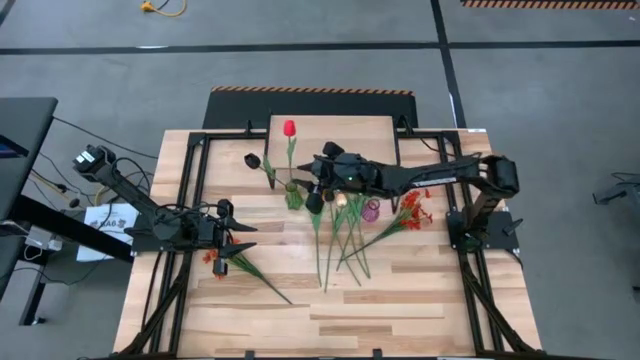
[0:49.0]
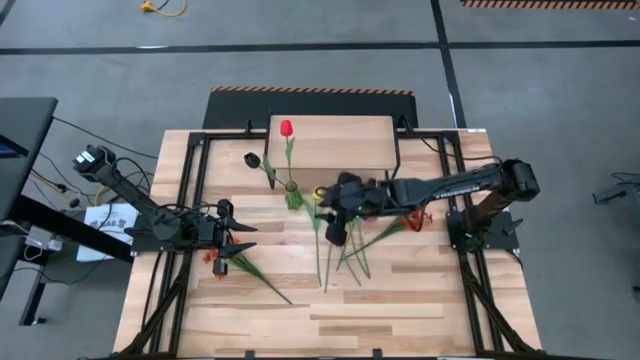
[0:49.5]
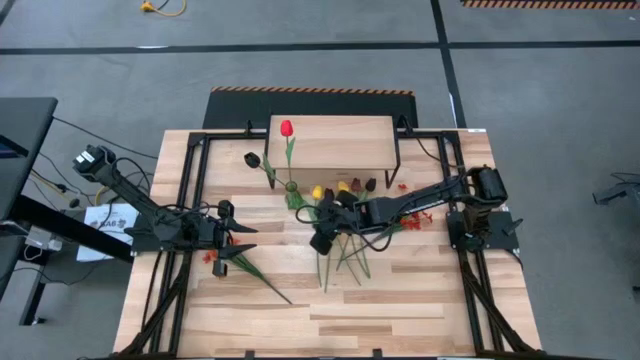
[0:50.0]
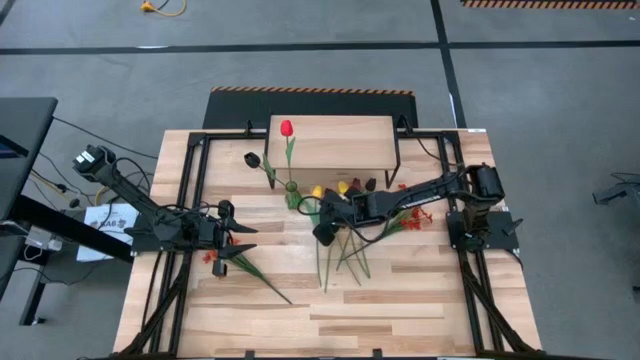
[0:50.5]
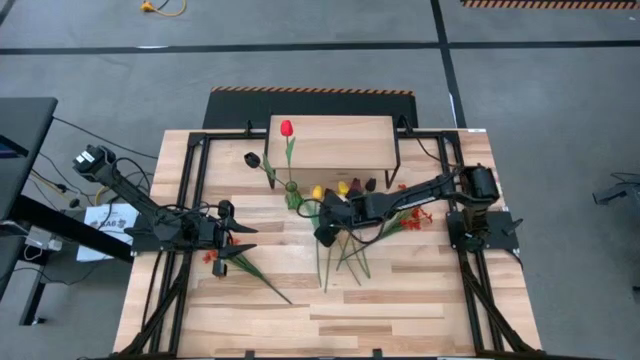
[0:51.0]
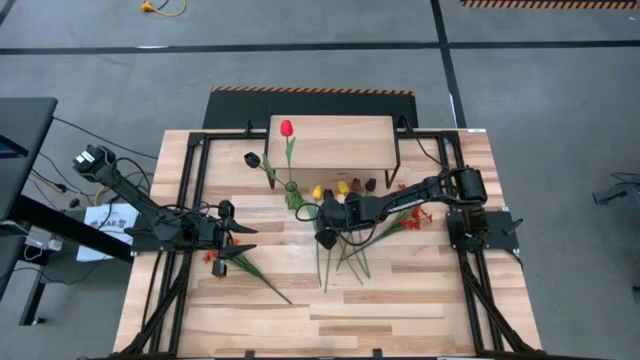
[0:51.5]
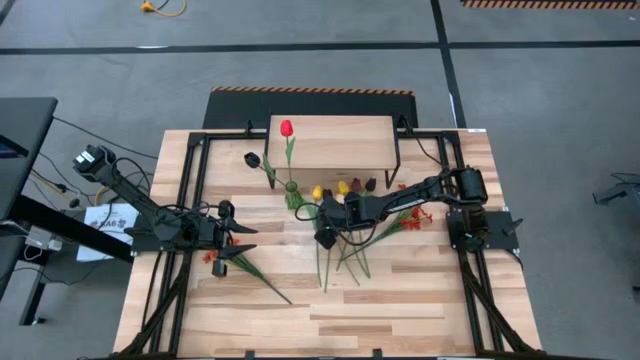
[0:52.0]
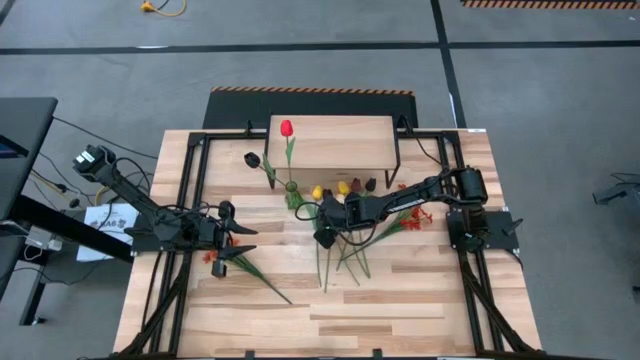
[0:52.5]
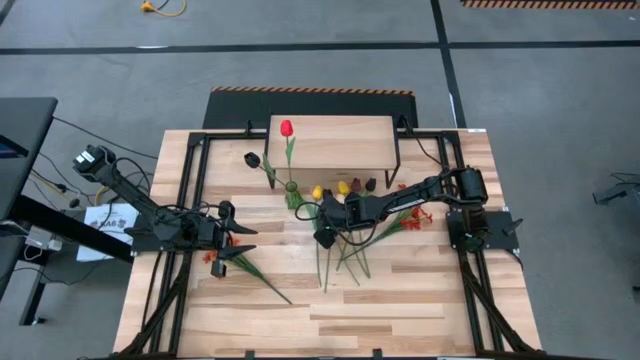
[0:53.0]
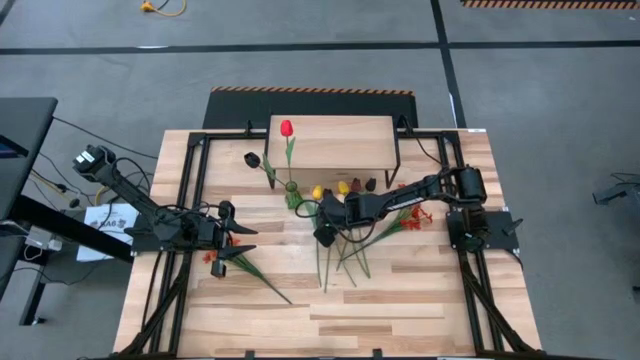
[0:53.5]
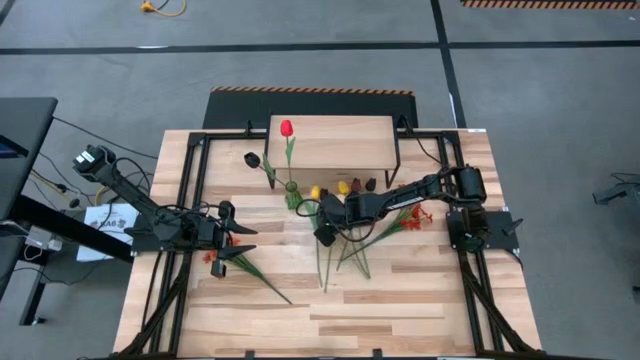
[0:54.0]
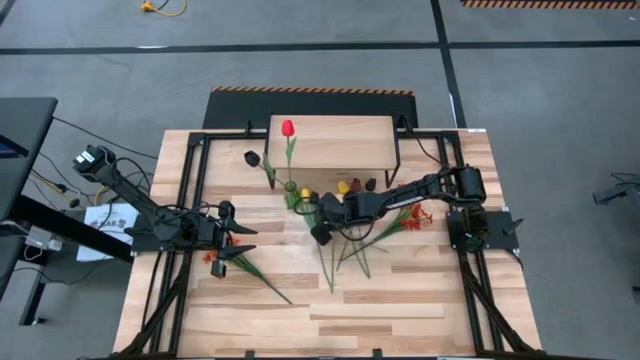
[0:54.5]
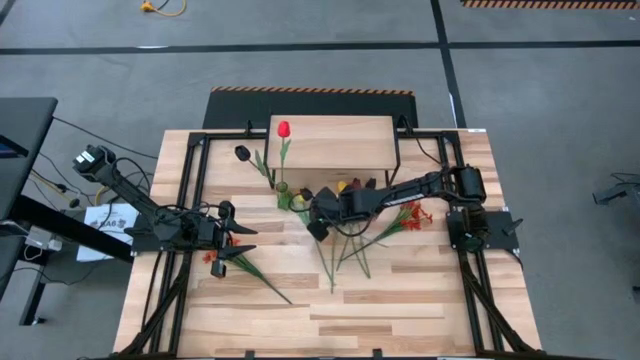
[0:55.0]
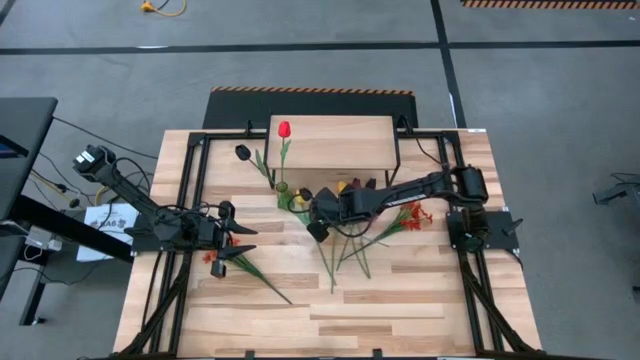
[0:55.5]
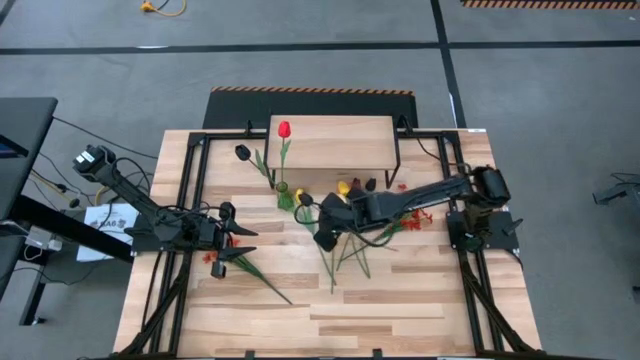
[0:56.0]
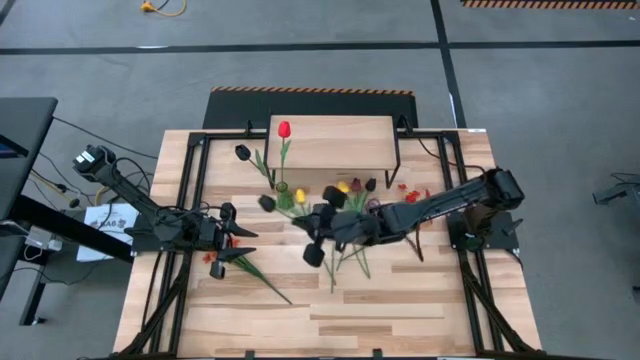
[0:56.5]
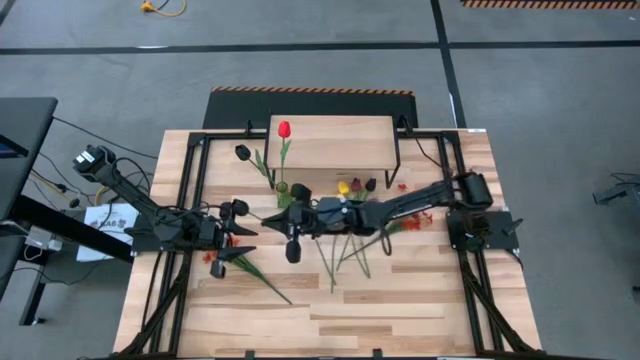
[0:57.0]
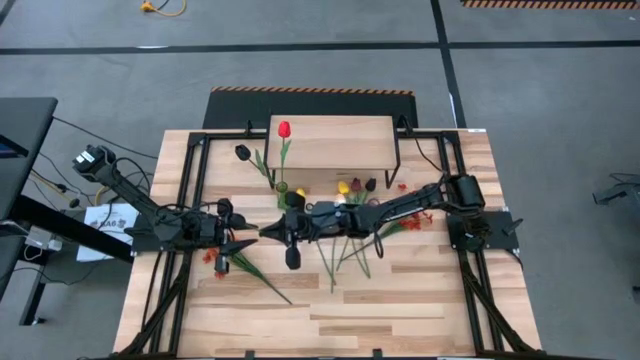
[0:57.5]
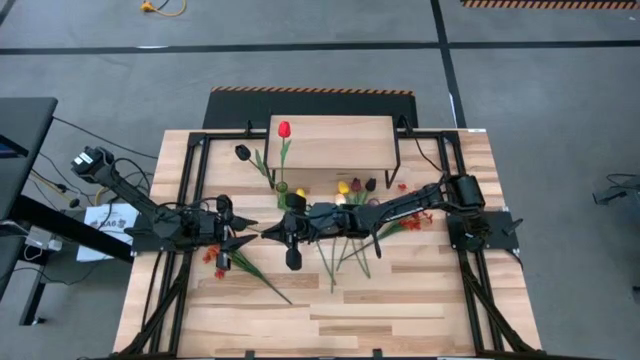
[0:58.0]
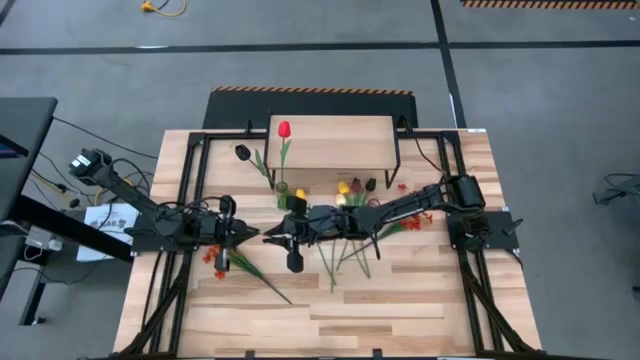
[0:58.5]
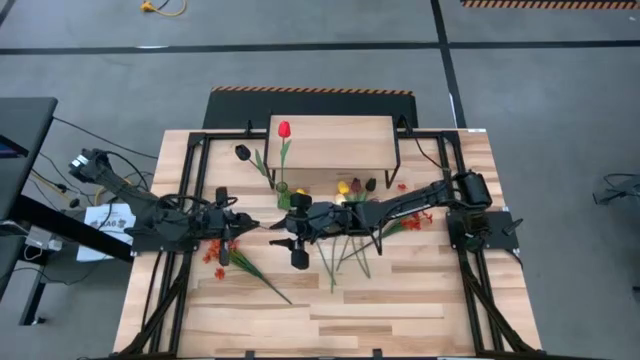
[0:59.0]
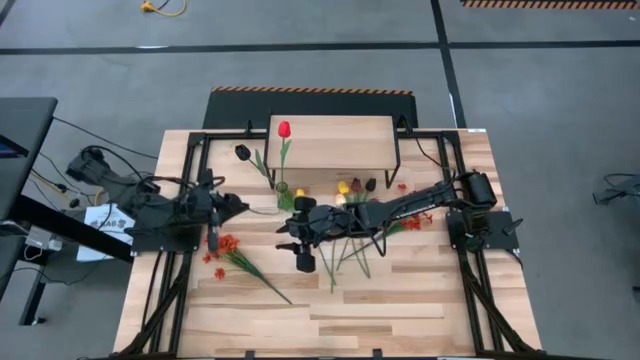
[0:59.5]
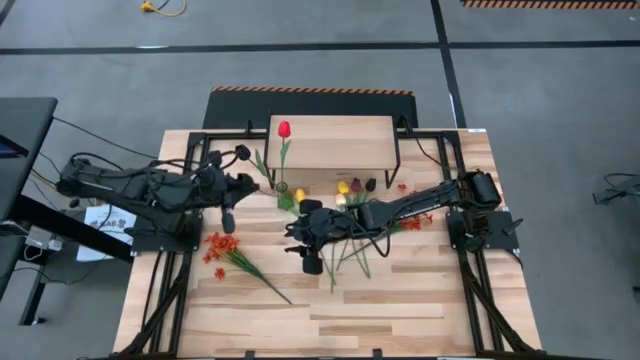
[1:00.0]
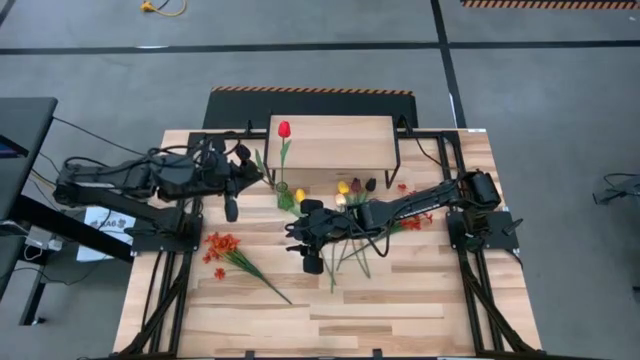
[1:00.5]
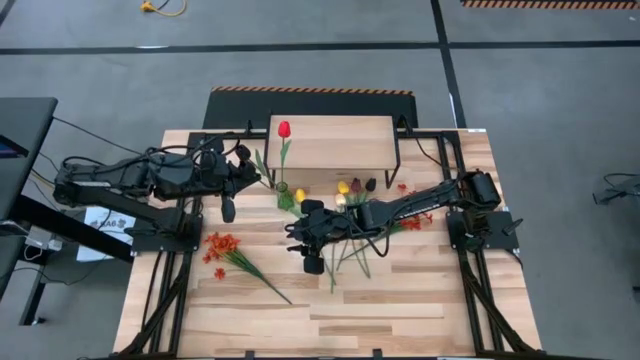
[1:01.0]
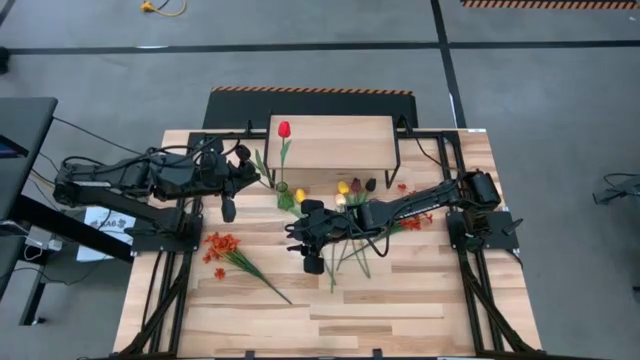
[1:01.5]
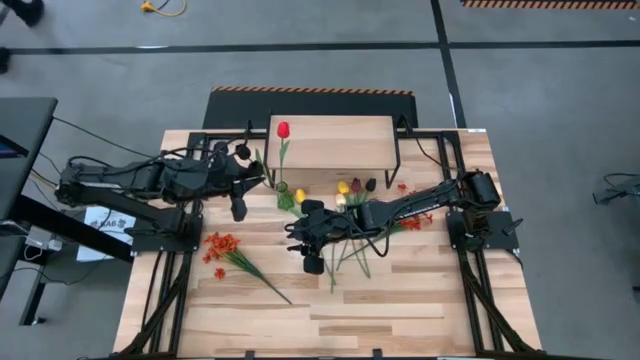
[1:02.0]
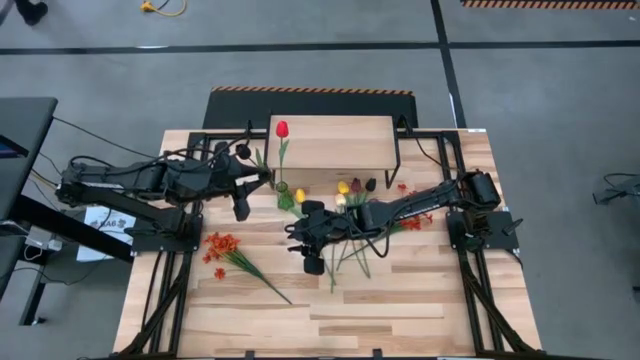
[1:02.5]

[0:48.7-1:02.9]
Task: Pick and place flowers into a vace then onto a shelf
Put the left black tulip into the green vase

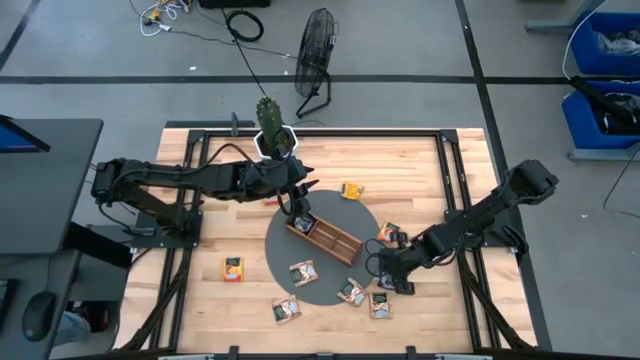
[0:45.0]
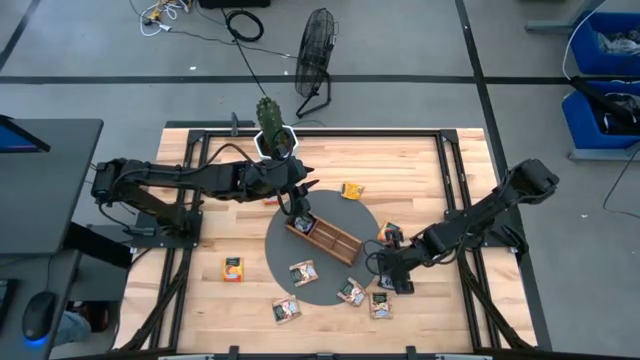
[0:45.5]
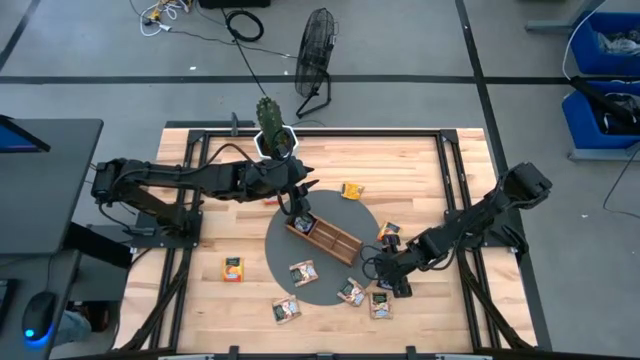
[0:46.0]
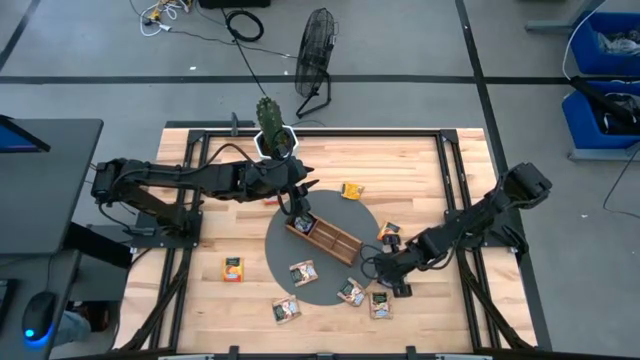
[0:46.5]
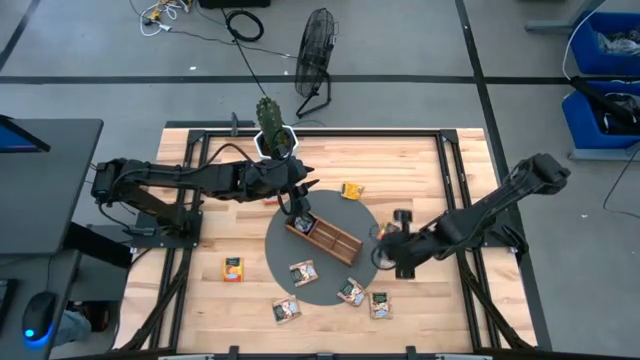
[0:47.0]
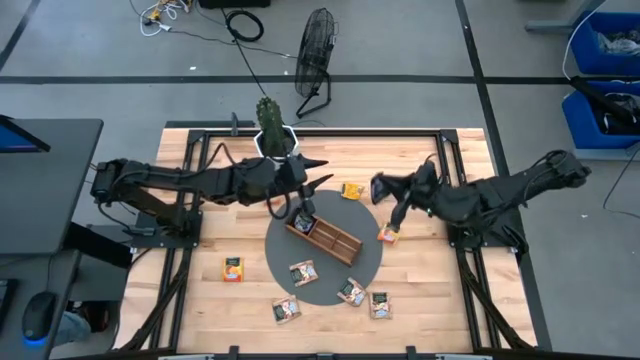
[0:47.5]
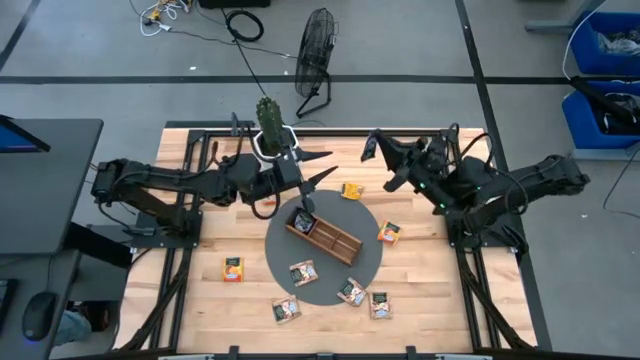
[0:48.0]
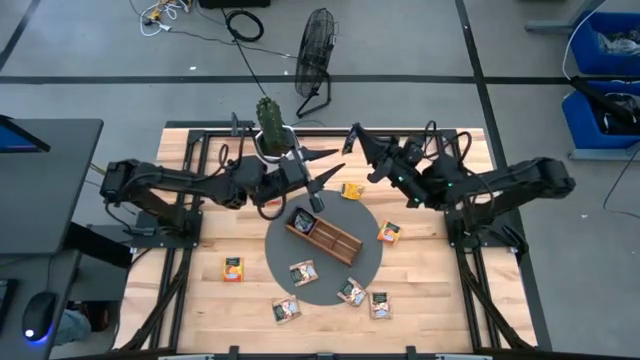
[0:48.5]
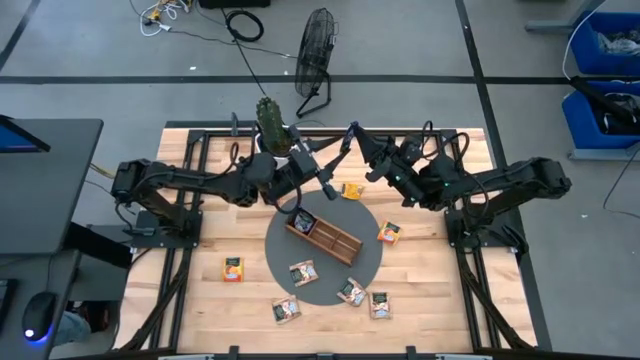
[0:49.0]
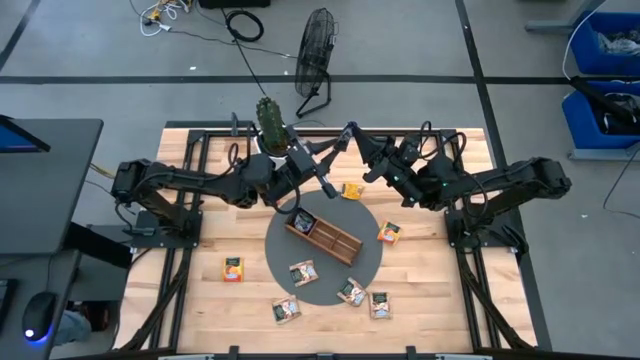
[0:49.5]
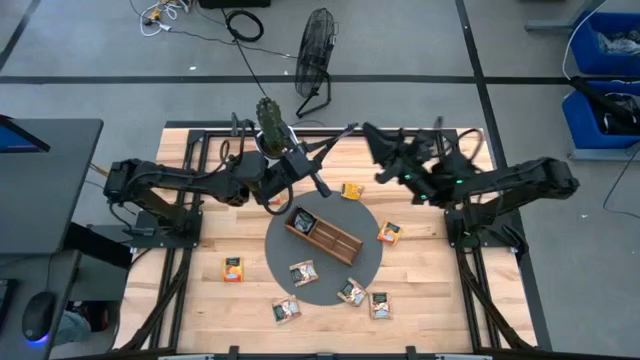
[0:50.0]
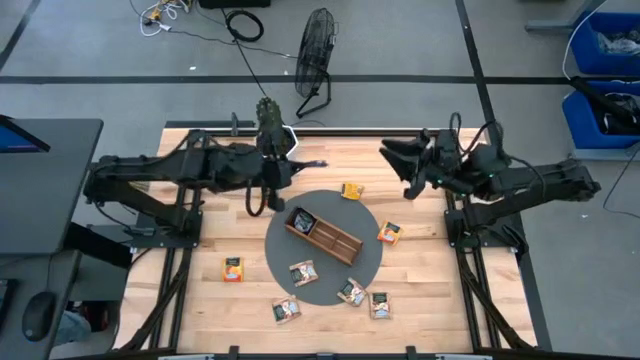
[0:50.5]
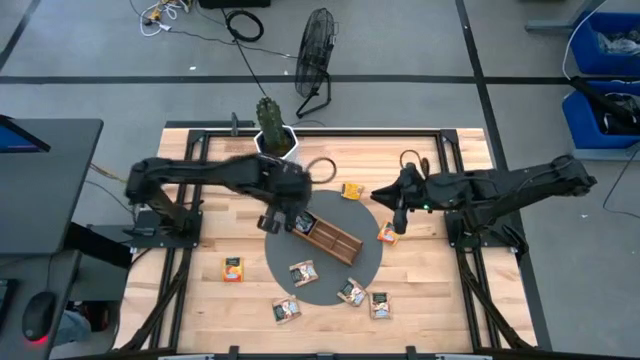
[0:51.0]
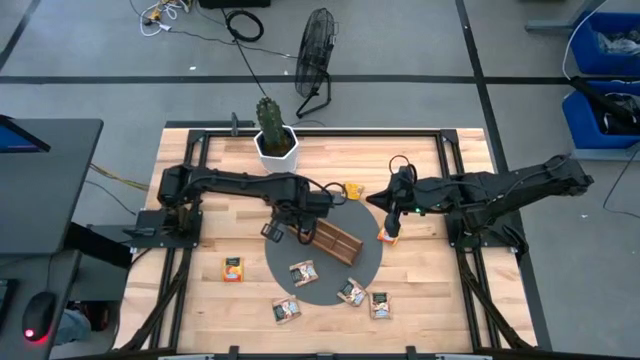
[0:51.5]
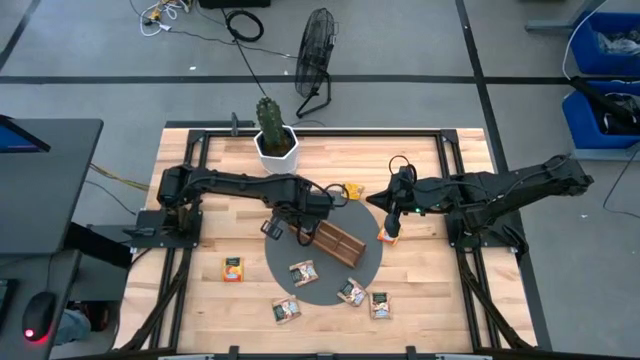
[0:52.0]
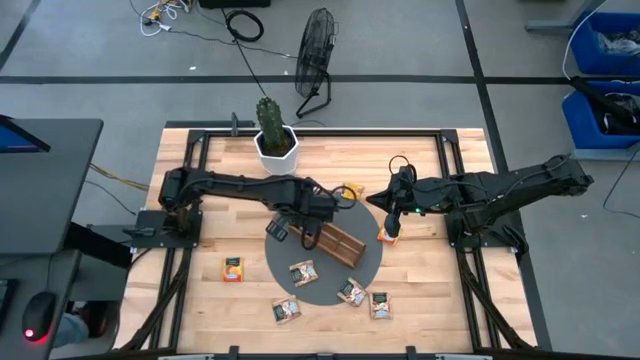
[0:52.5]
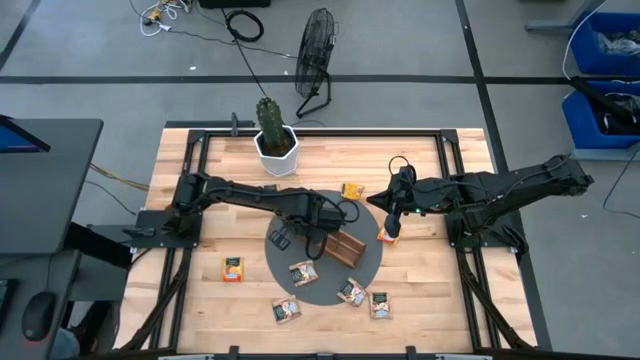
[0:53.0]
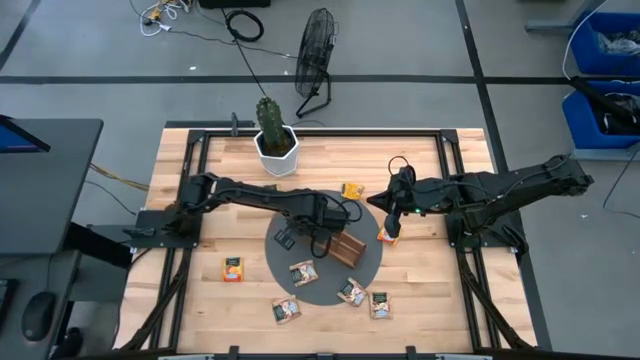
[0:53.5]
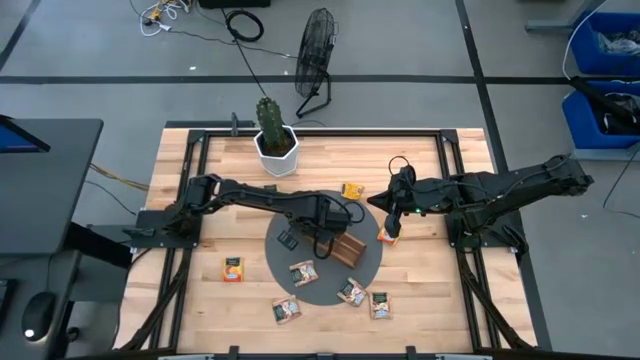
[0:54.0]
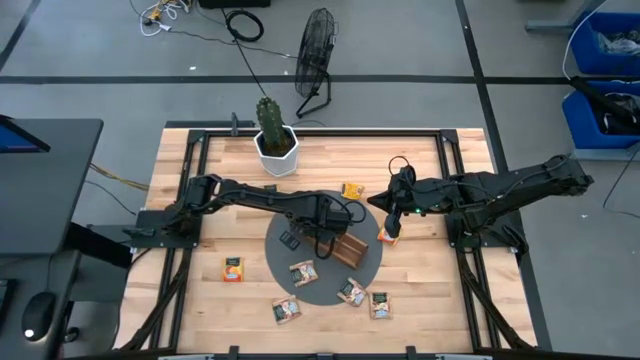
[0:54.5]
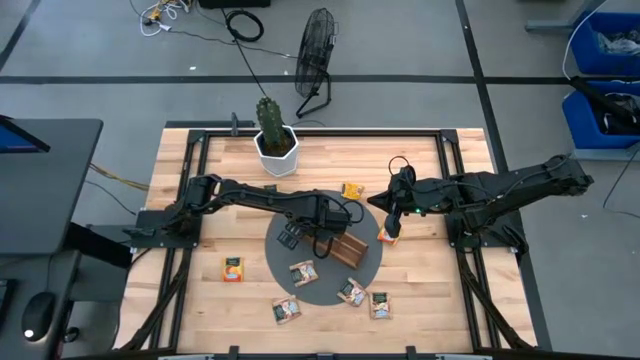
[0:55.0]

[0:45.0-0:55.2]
Task: Pick & Place Tea
Put the purple tea bag into the left section of the wooden organizer
